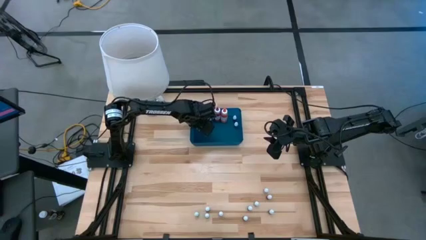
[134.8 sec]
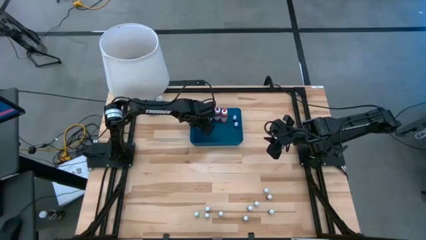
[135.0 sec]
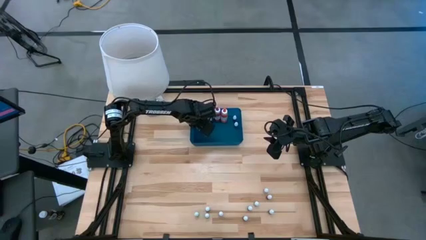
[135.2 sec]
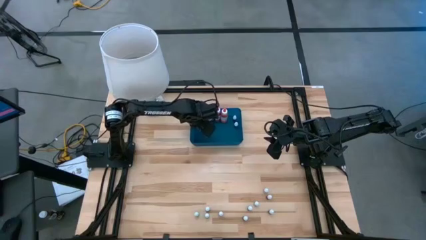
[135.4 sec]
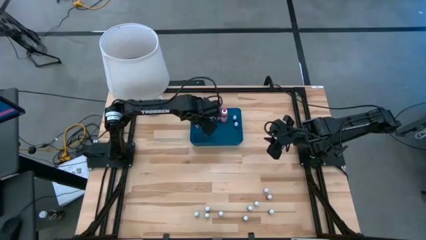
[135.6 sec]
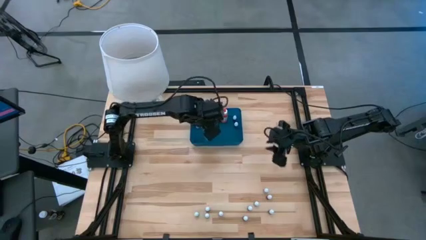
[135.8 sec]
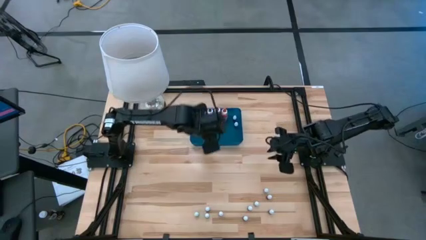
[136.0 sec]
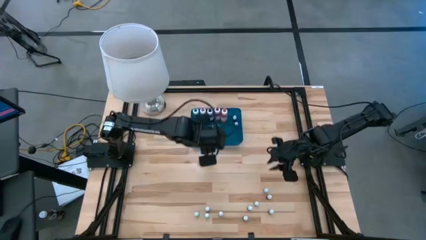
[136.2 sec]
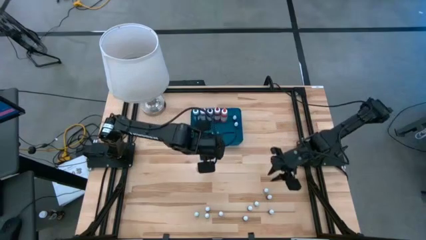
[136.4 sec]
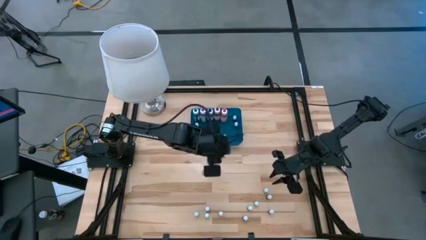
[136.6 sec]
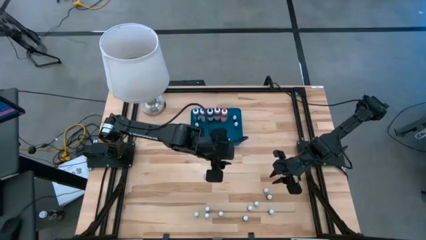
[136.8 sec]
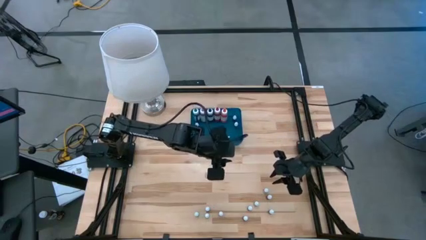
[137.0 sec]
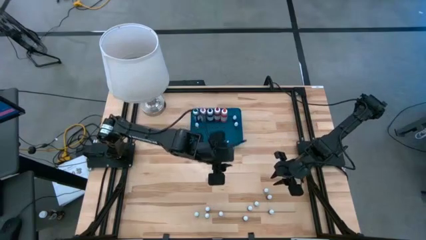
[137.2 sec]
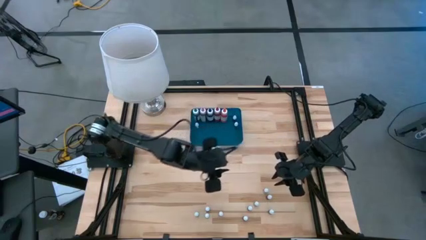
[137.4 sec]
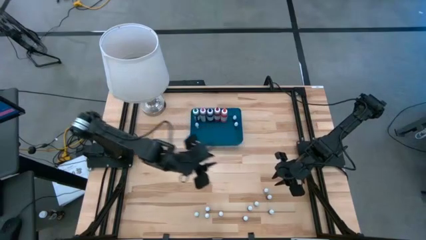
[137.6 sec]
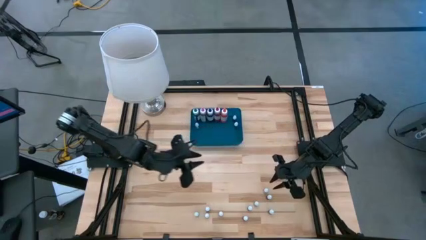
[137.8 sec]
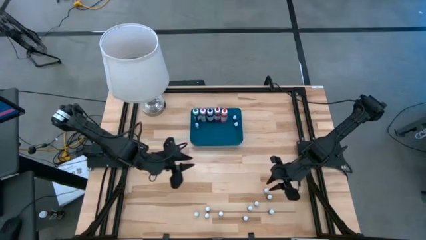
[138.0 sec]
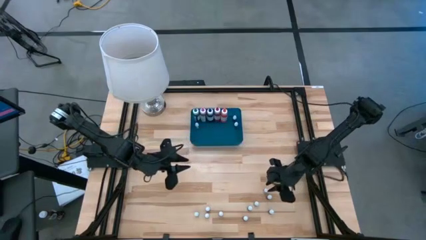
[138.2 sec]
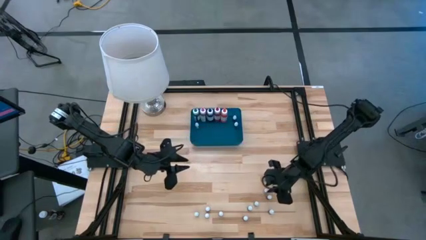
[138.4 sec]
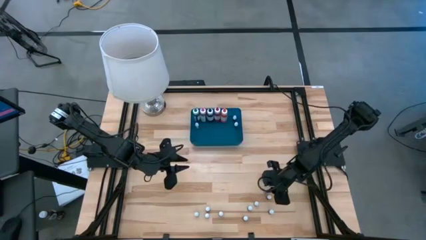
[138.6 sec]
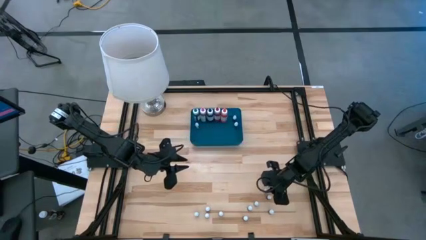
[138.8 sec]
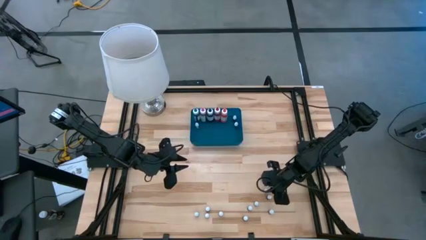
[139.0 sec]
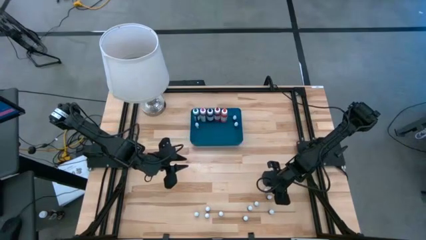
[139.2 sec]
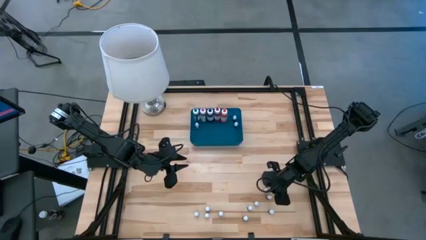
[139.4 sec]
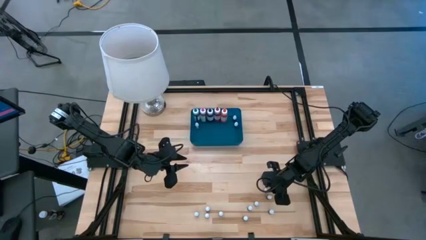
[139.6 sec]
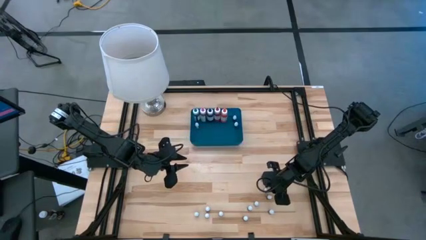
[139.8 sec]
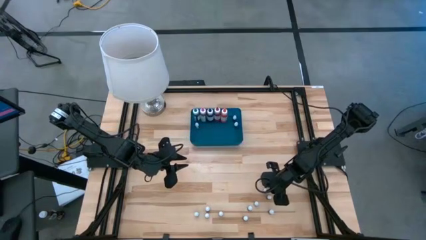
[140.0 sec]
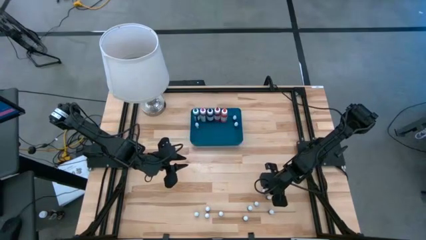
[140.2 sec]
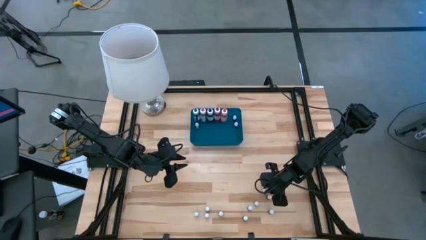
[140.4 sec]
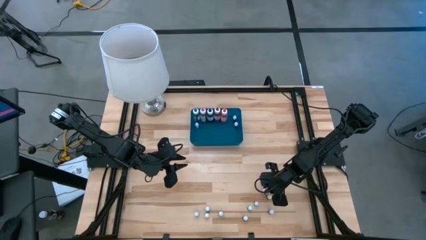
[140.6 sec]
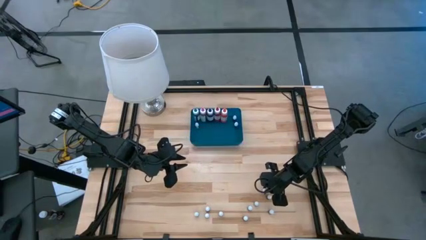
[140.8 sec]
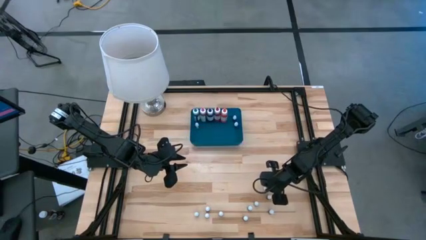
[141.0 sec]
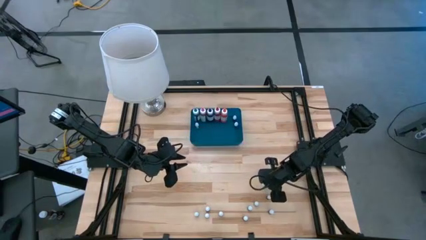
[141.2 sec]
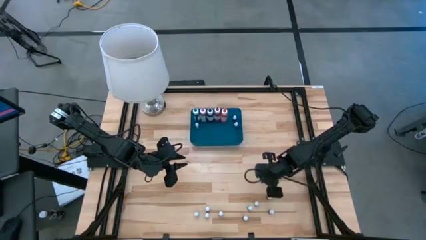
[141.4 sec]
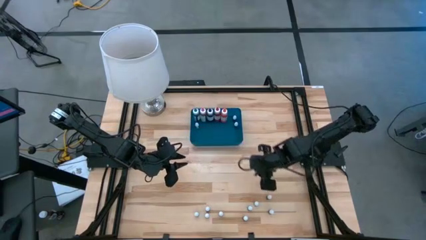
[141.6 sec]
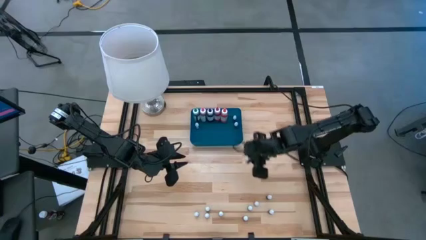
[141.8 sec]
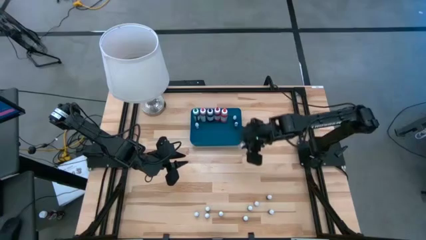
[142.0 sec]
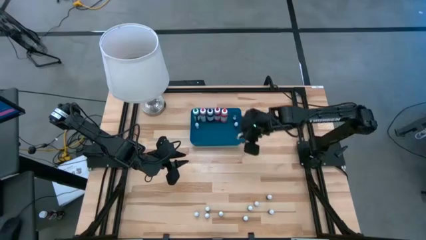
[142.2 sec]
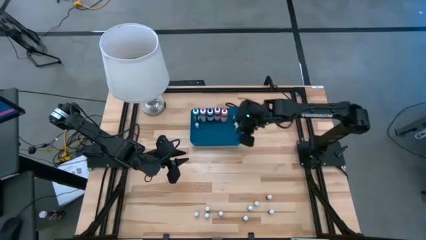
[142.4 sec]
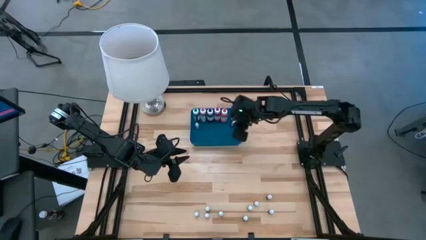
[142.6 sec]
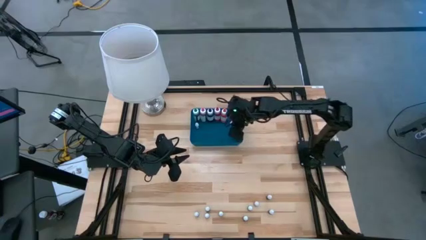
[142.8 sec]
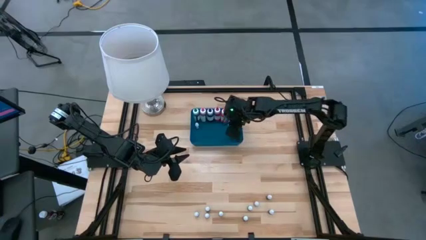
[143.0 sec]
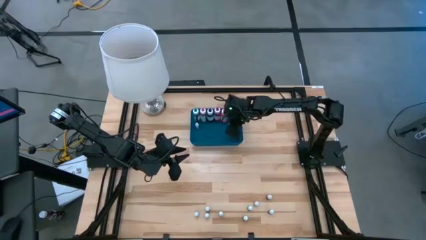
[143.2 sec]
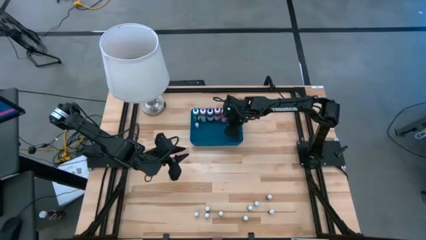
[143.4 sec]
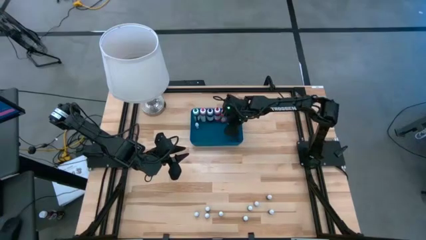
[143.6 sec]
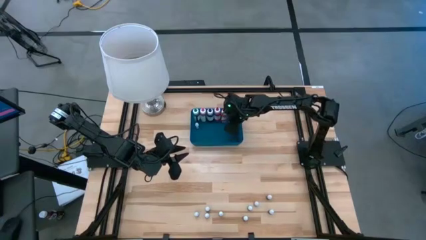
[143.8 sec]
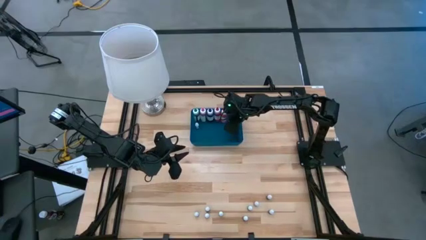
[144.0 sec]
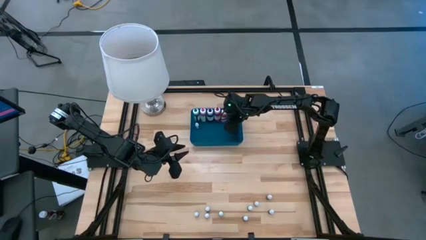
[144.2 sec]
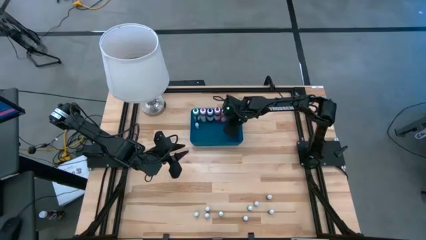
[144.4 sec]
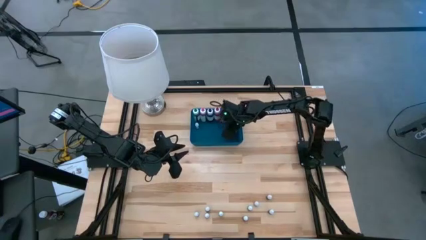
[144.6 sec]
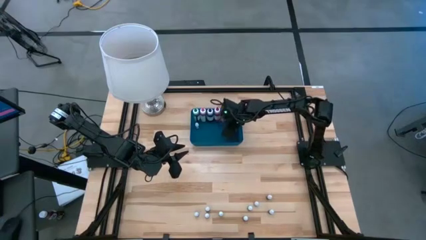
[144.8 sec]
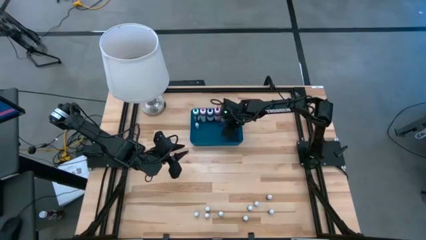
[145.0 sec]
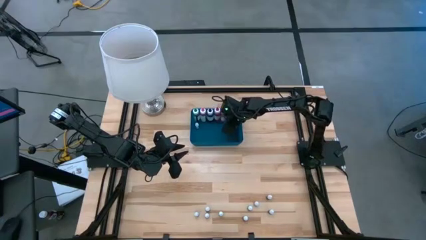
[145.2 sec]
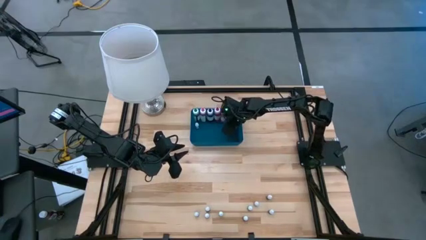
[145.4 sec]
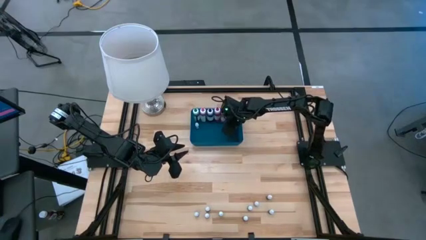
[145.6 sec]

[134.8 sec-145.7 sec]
Task: Pick & Place food coloring
Put the top small red food coloring bottle into the bin

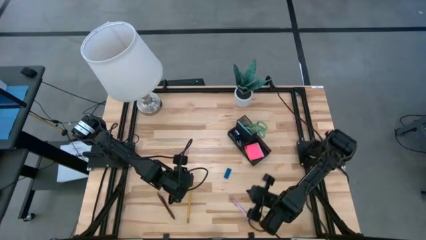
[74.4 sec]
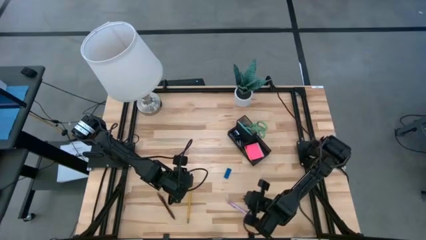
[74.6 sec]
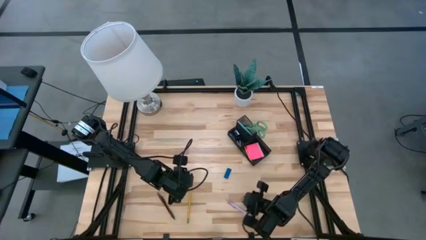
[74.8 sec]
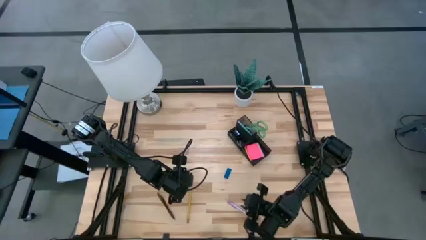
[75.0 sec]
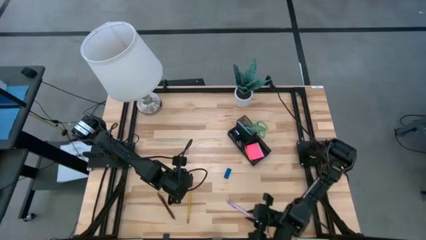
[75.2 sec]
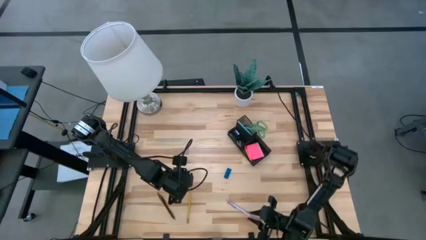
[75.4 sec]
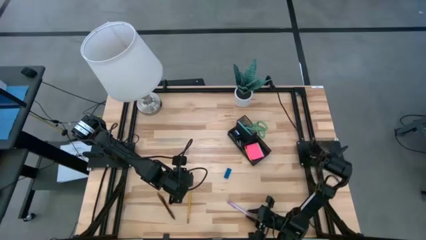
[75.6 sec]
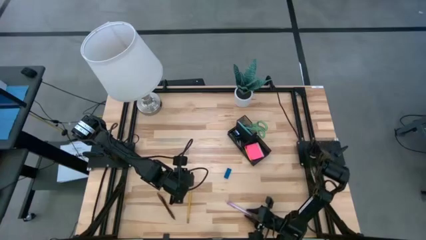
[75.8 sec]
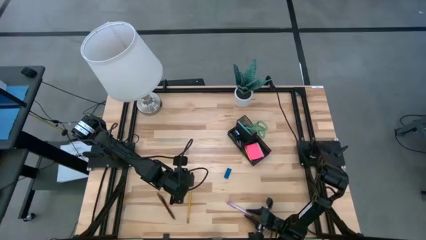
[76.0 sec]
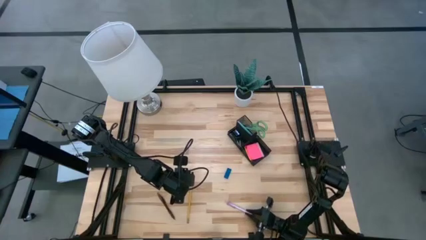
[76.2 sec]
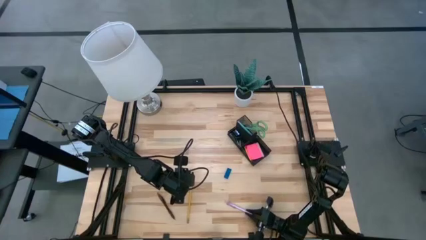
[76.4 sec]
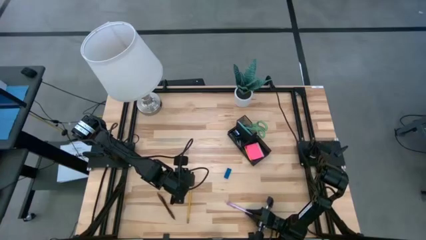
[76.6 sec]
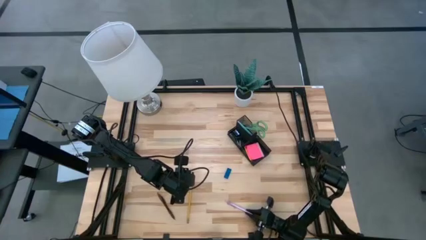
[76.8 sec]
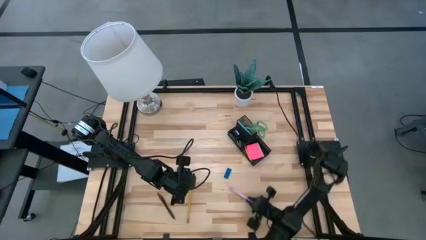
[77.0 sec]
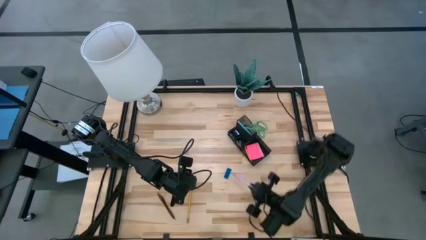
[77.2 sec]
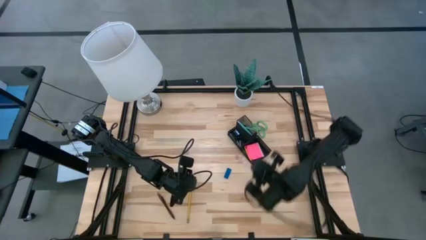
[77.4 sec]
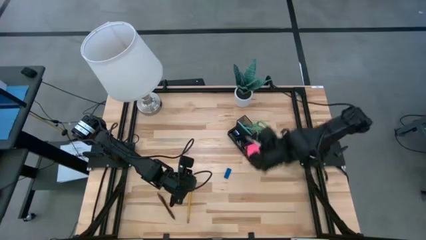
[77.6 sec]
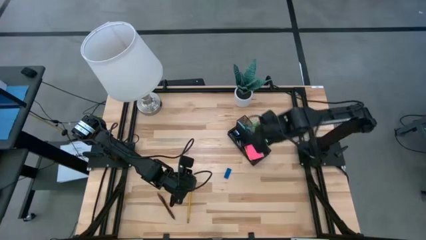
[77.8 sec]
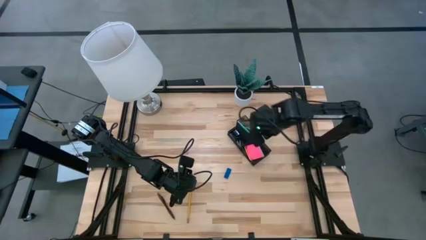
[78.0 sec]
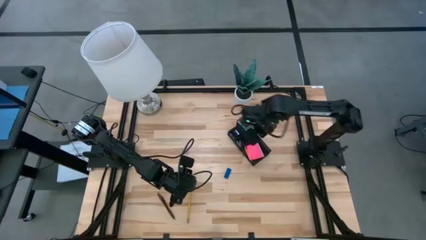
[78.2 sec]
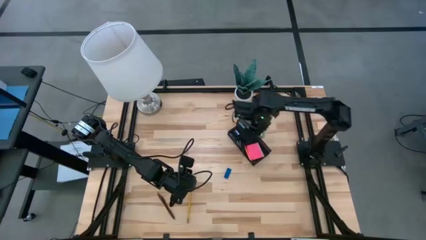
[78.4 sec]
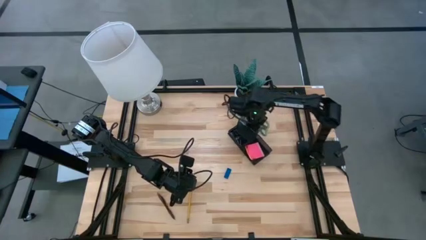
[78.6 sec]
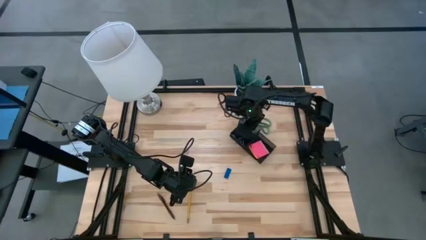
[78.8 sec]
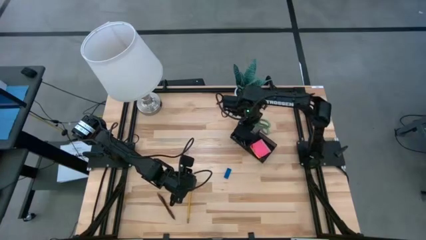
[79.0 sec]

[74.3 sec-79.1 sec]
Task: Pick and place office supplies into organizer
Put the purple pen into the desk organizer
